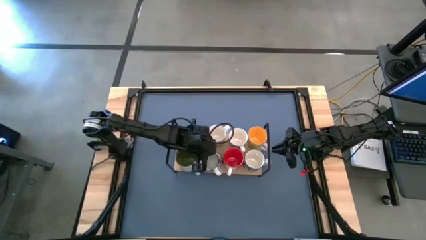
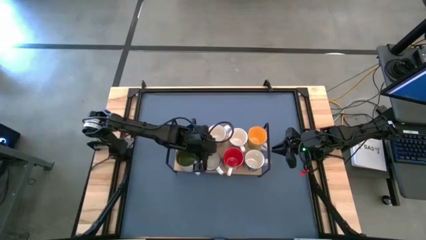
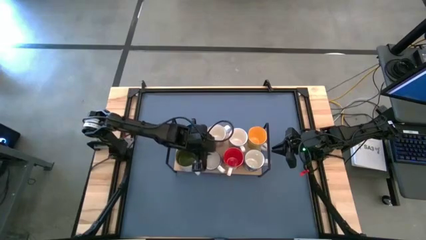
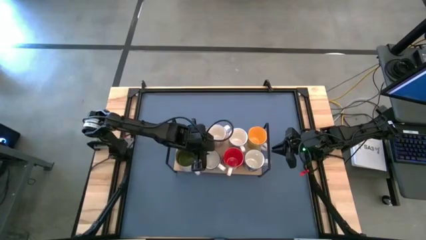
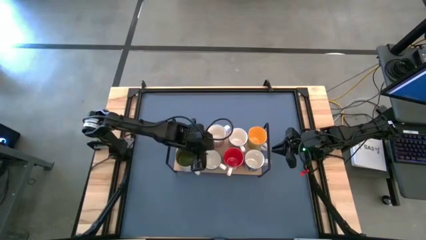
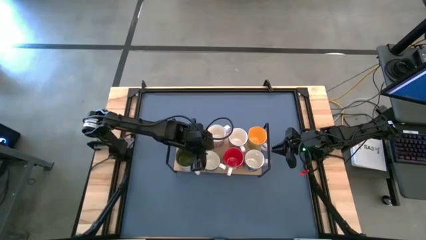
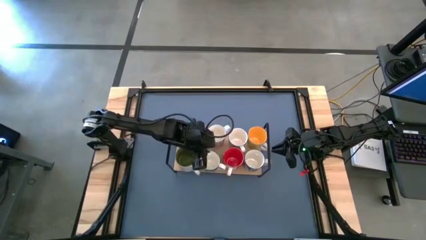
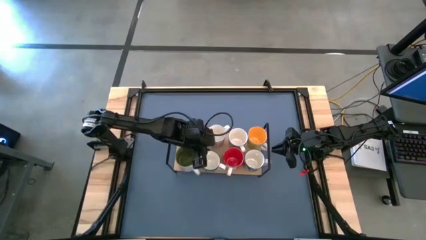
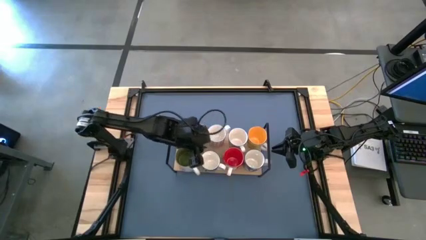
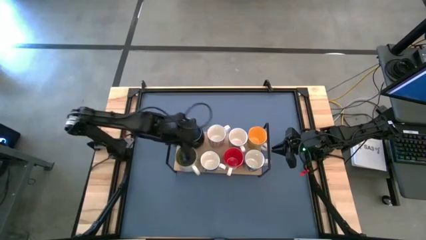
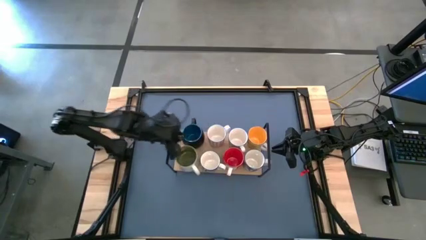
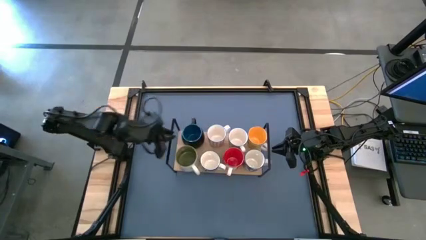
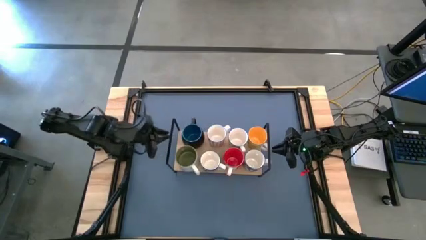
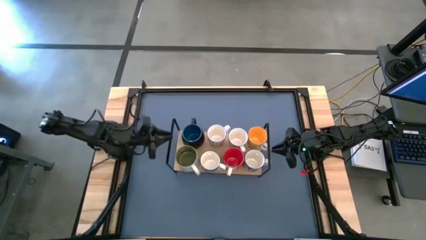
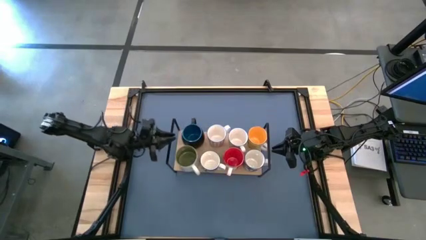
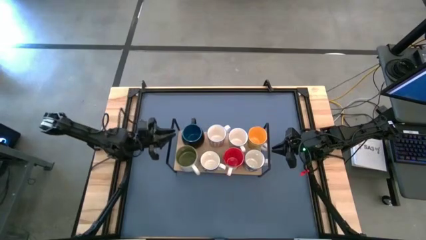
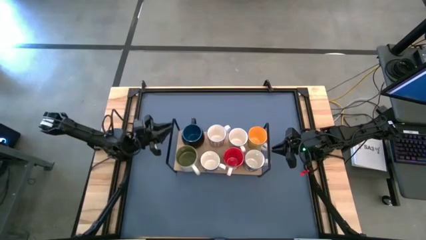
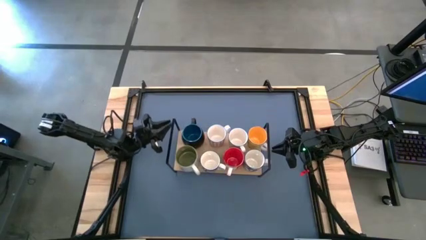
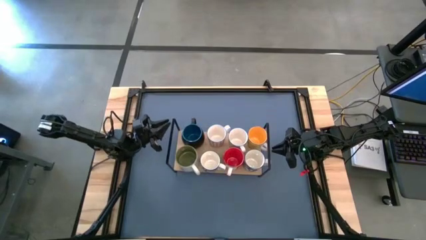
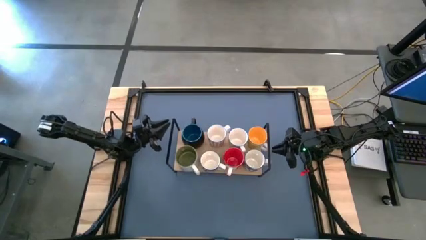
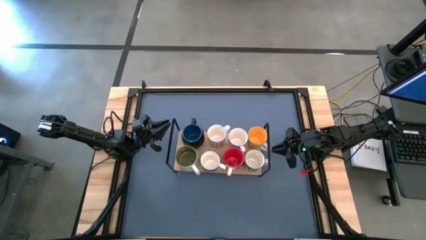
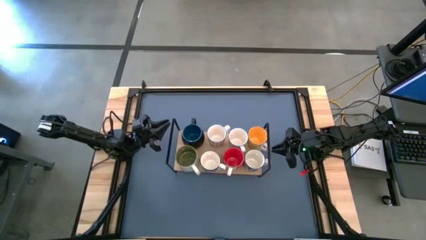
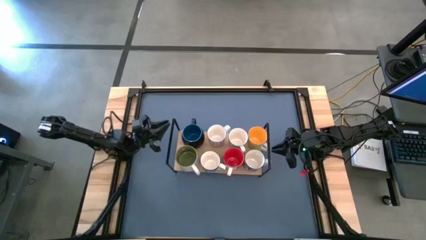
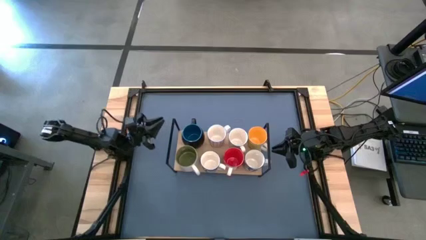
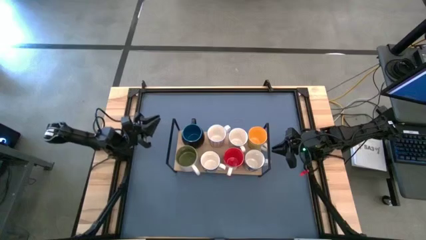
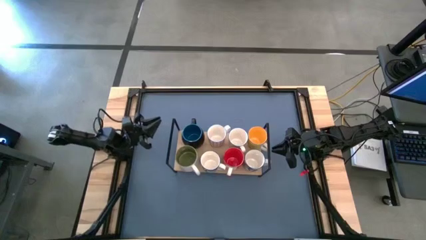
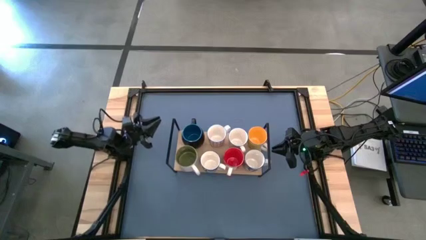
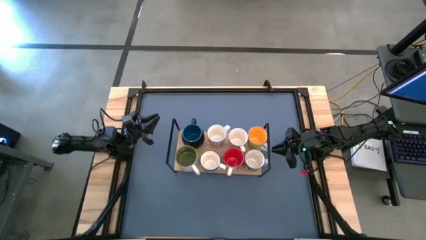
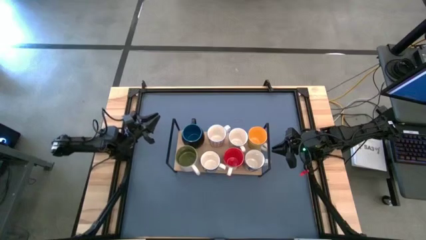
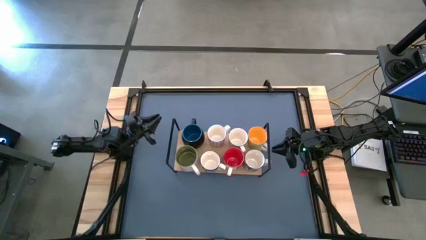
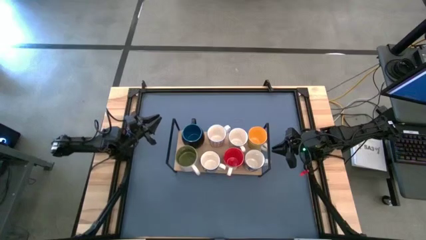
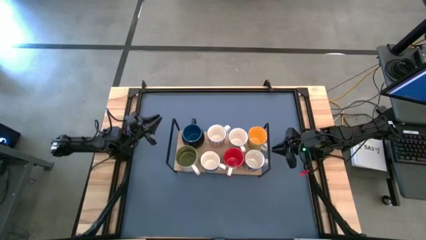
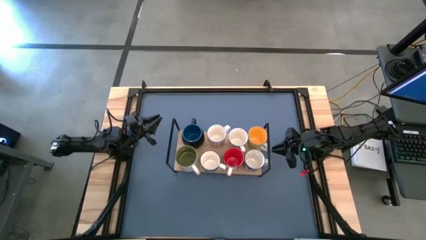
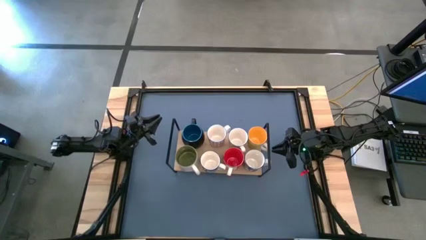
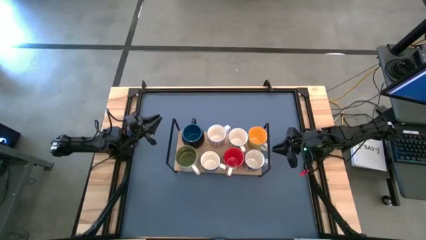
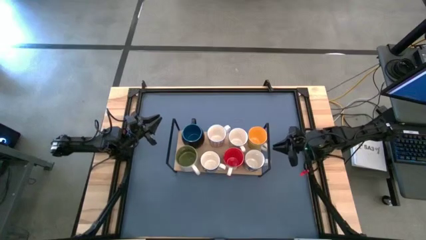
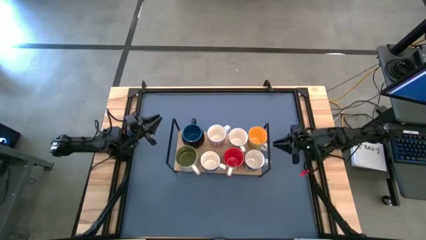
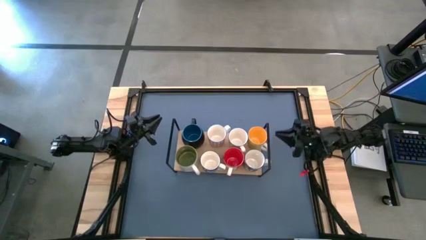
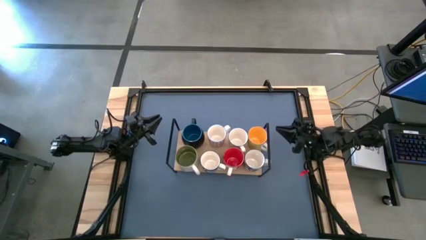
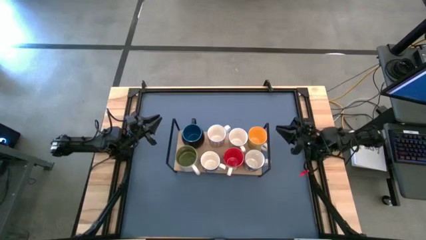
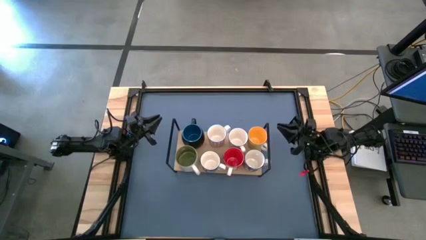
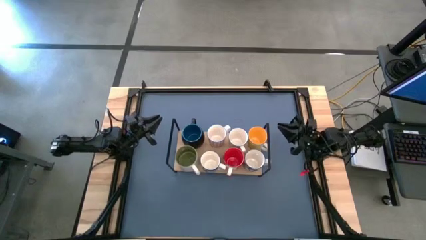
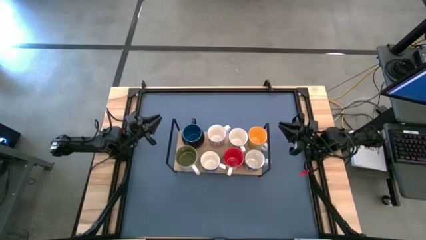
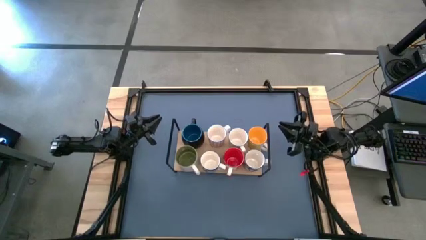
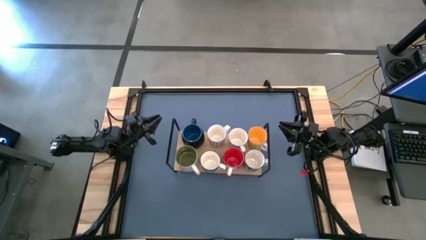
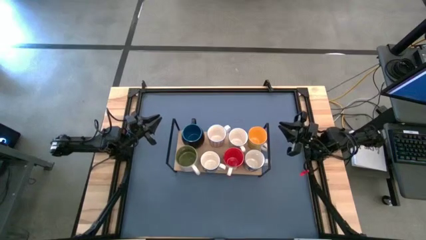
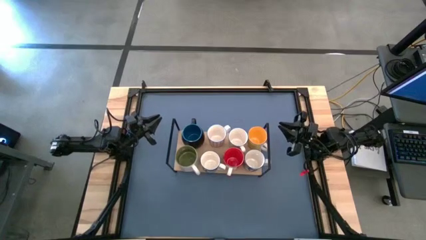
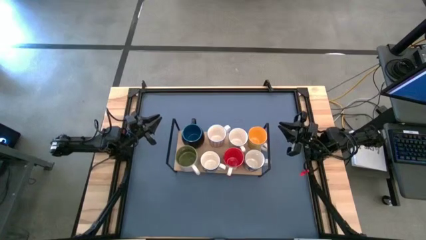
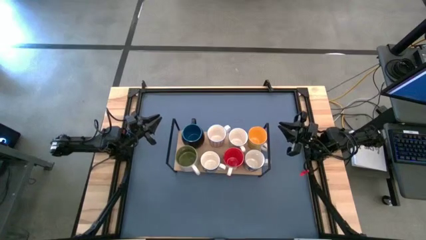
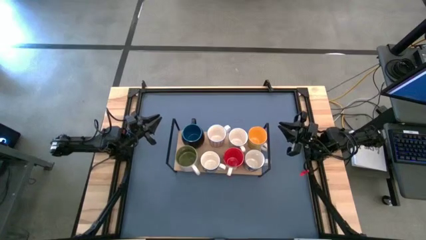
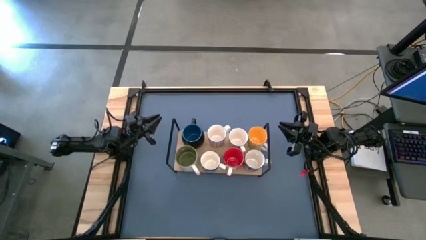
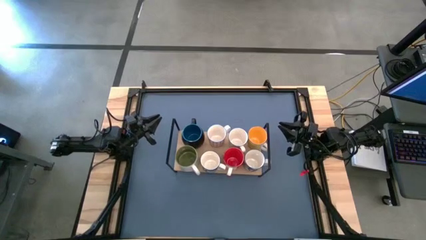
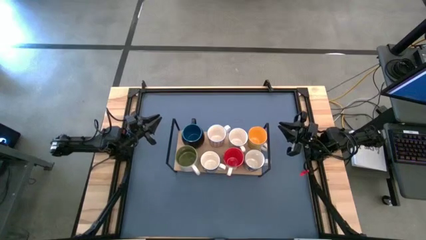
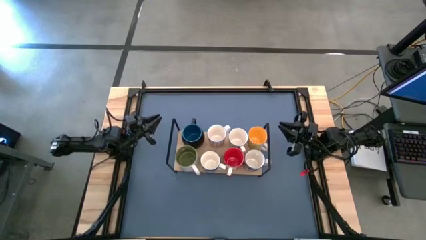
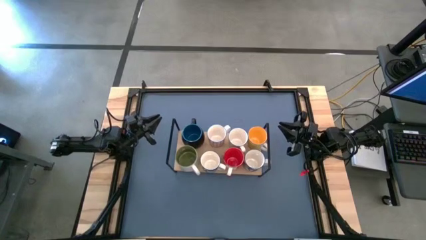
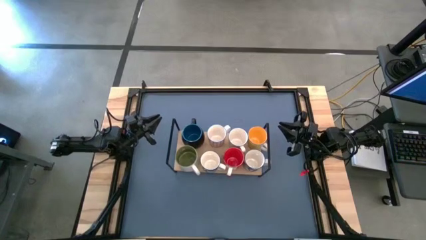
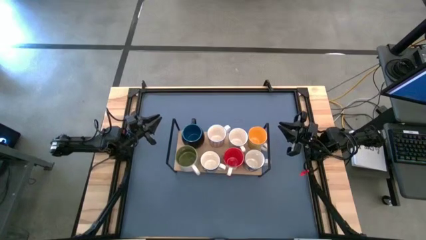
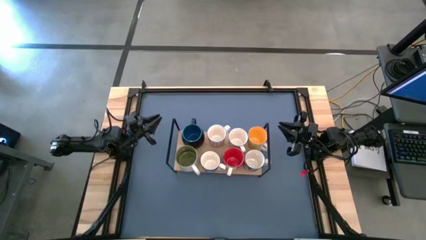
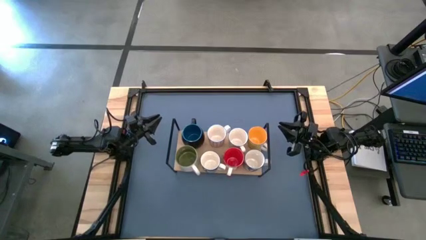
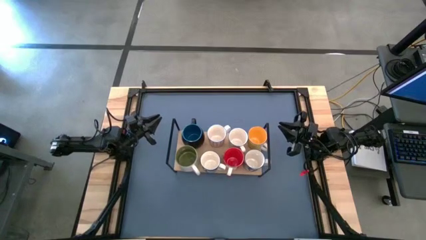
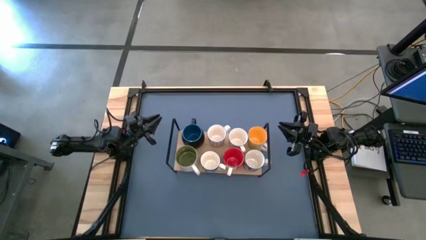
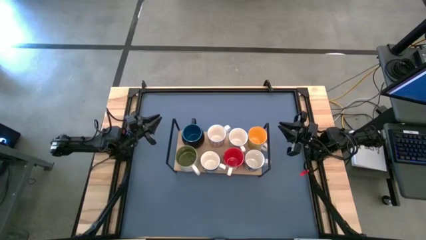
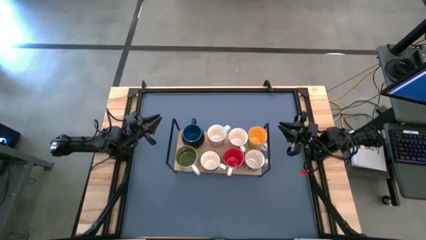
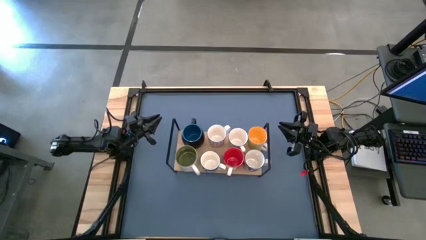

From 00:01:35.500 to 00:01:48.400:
Task: Place coffee mugs
Return to Home Position

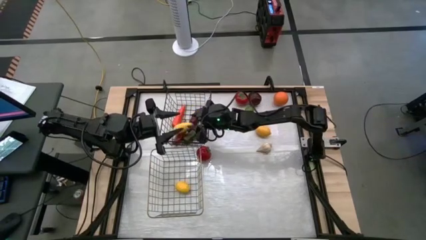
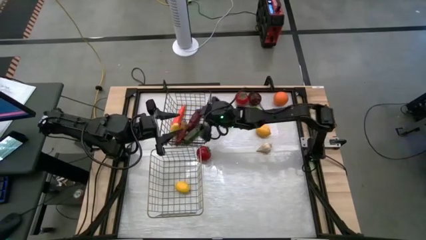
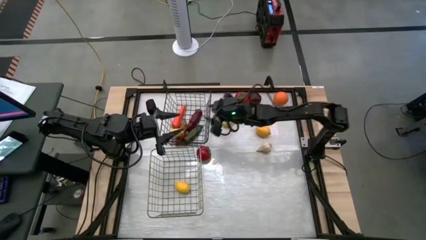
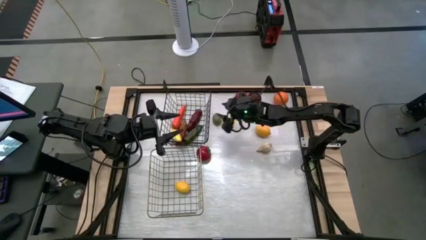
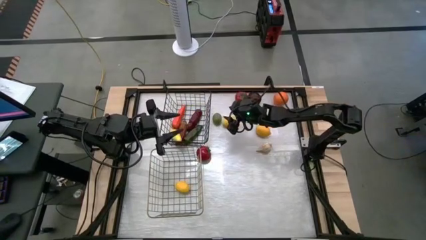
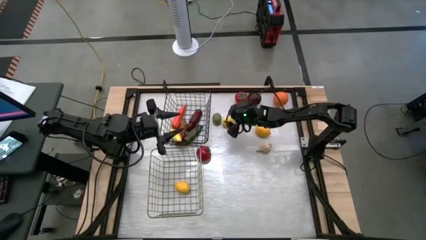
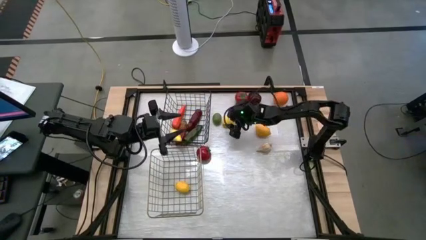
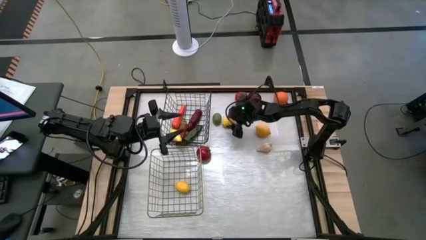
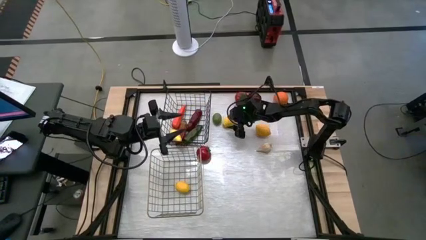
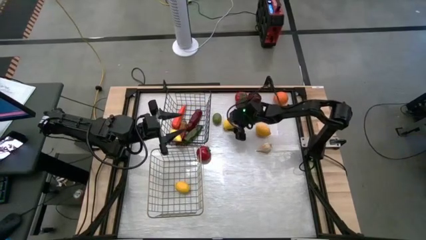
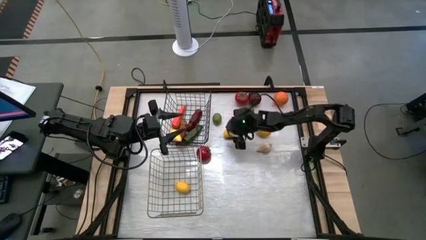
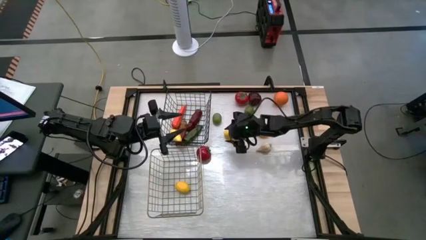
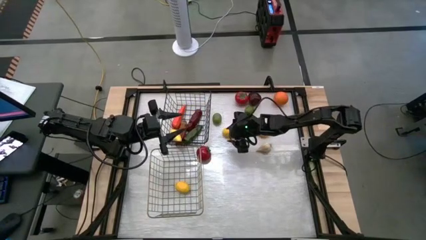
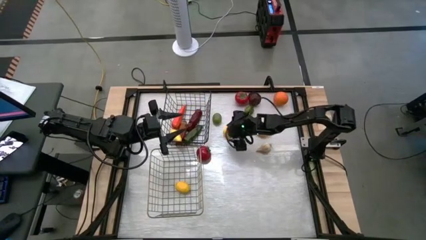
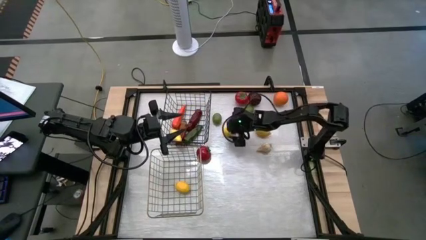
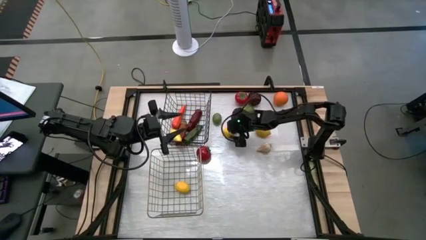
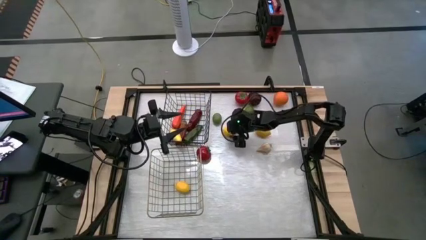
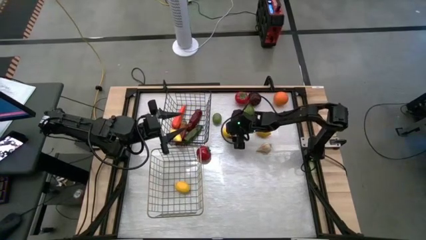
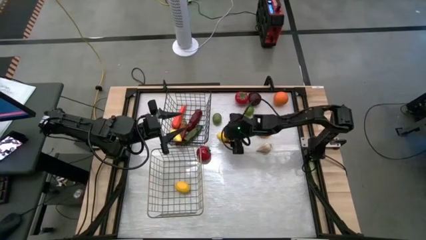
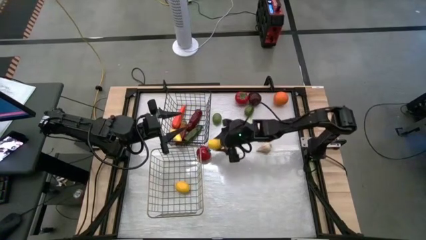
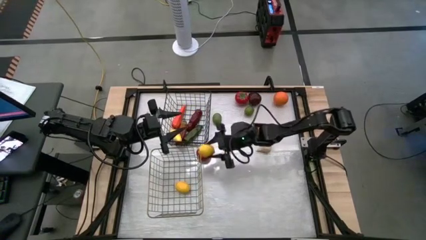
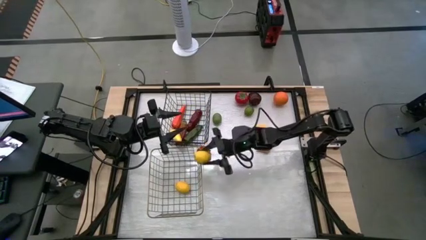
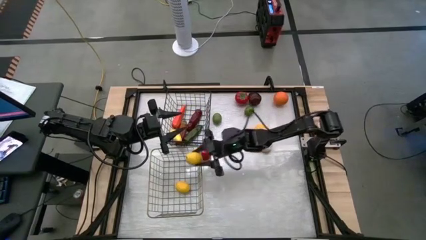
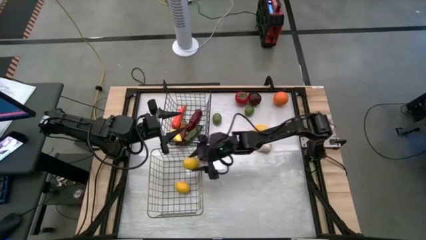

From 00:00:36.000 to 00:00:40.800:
Task: Sort produce into baskets
Put the left yellow lemon into the gold wire basket
